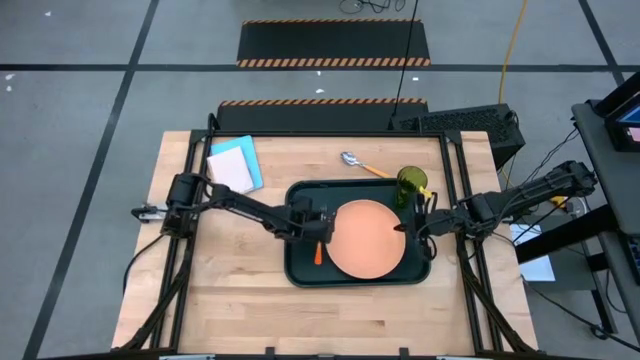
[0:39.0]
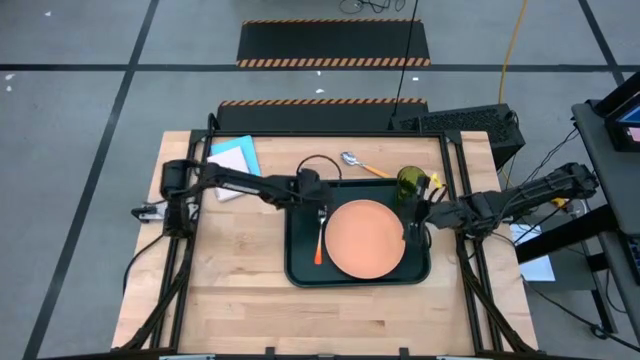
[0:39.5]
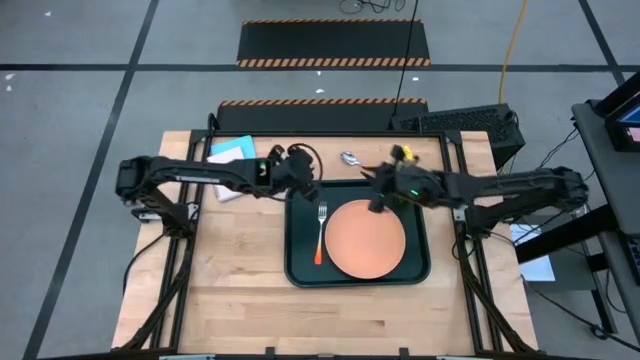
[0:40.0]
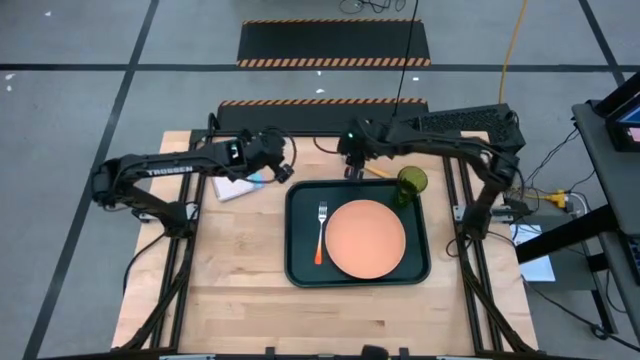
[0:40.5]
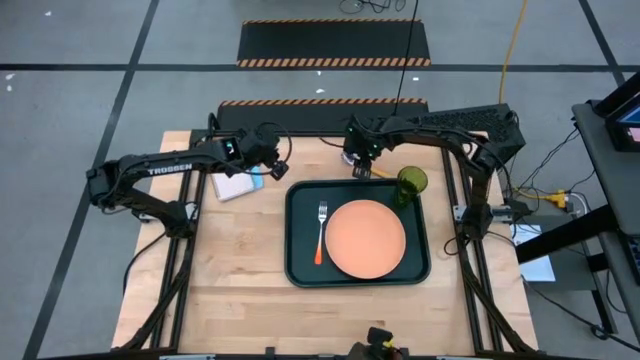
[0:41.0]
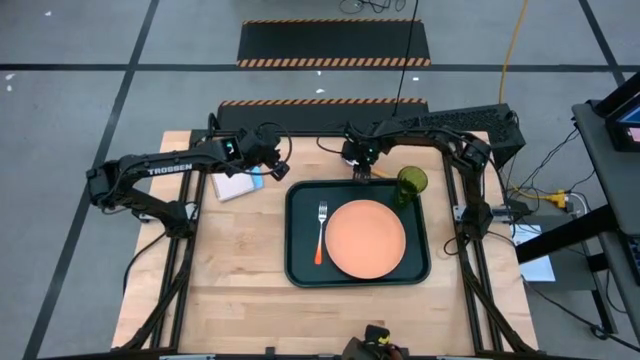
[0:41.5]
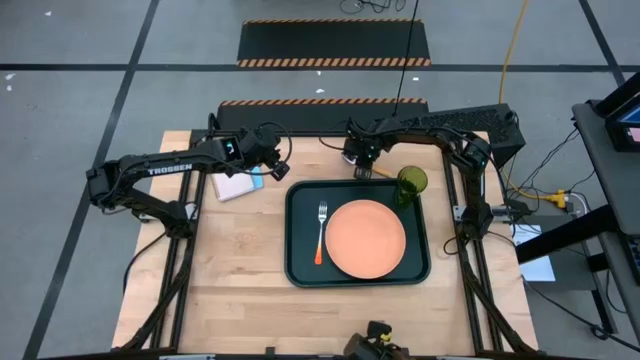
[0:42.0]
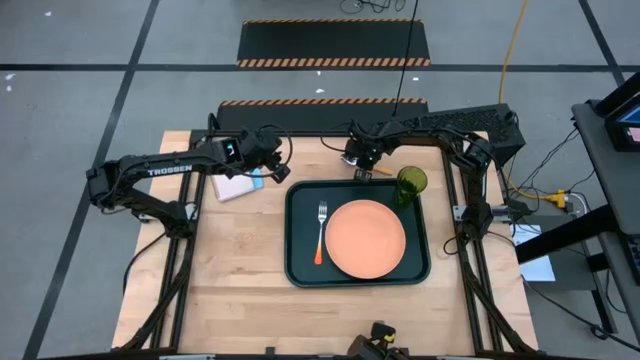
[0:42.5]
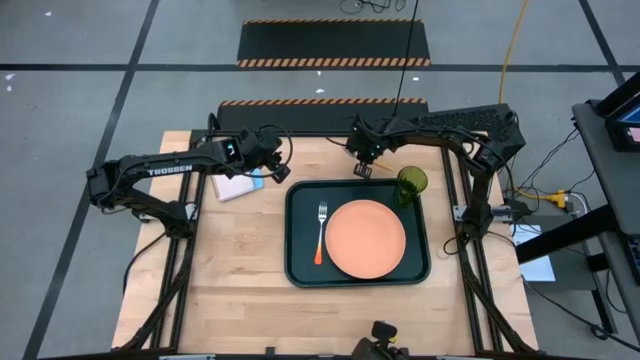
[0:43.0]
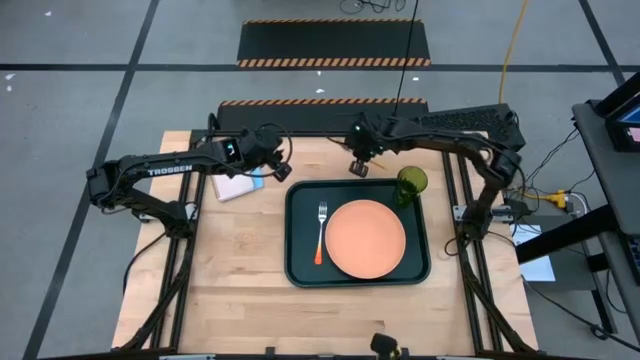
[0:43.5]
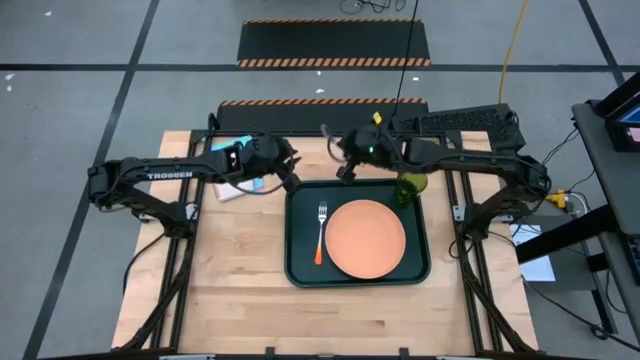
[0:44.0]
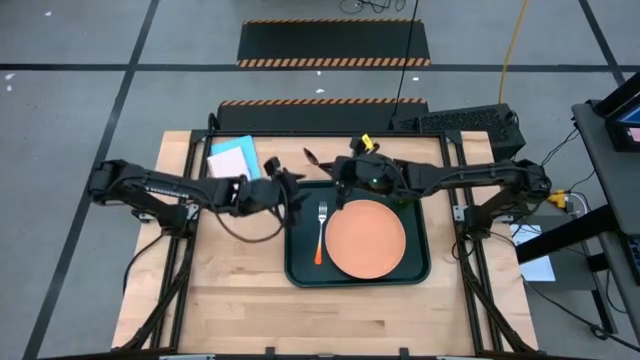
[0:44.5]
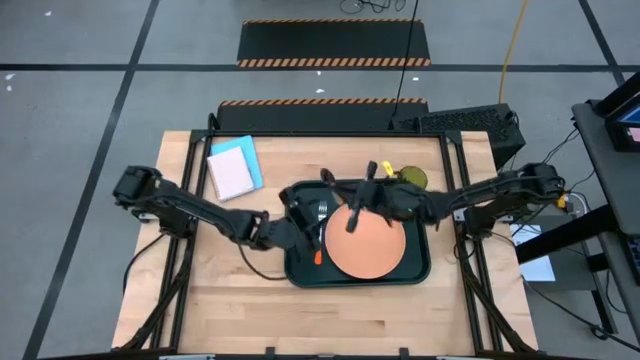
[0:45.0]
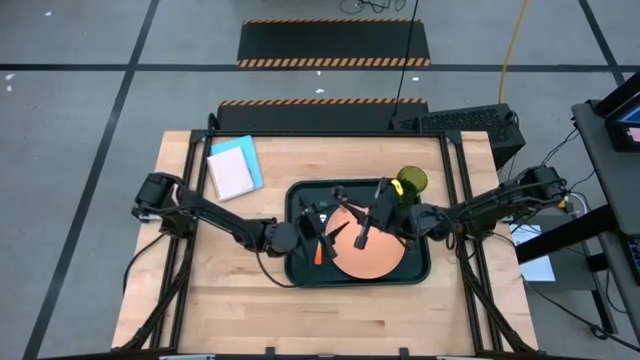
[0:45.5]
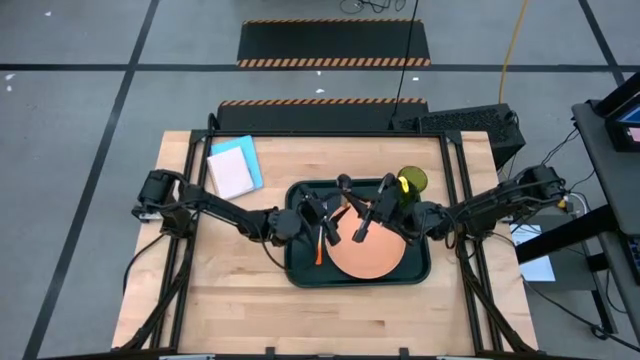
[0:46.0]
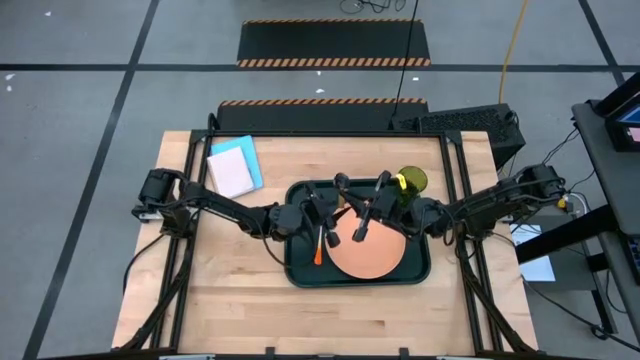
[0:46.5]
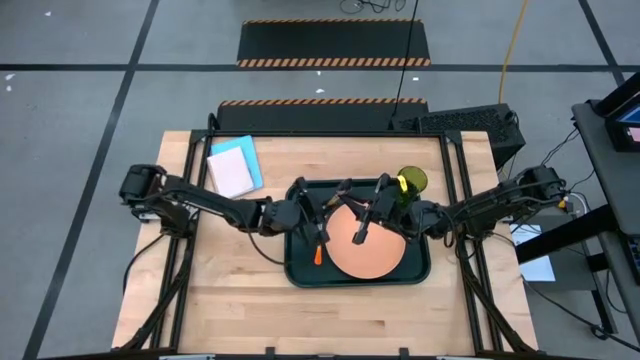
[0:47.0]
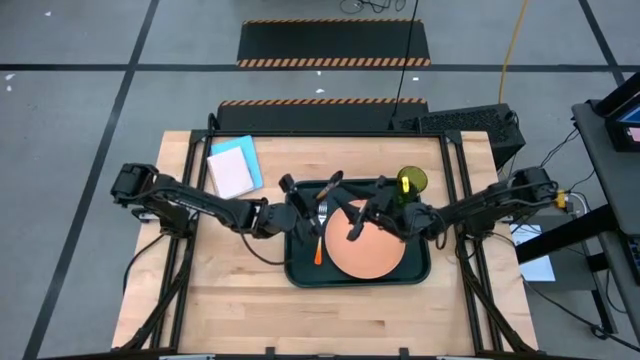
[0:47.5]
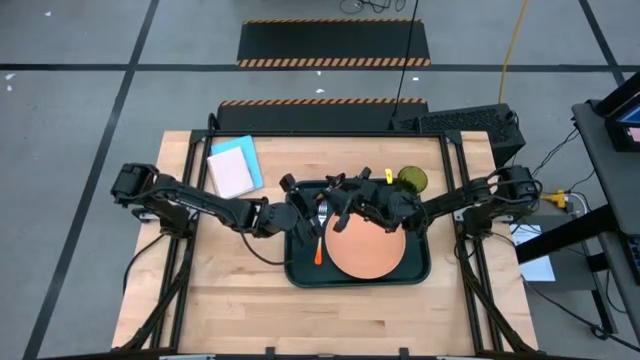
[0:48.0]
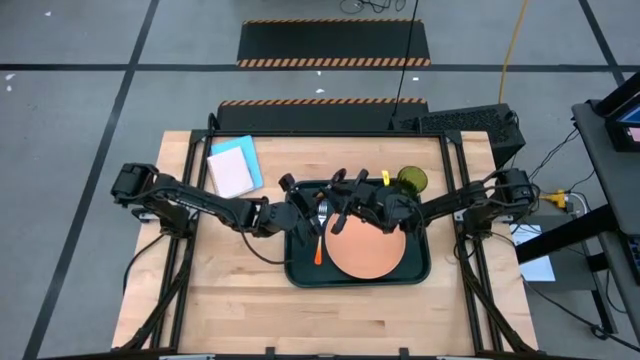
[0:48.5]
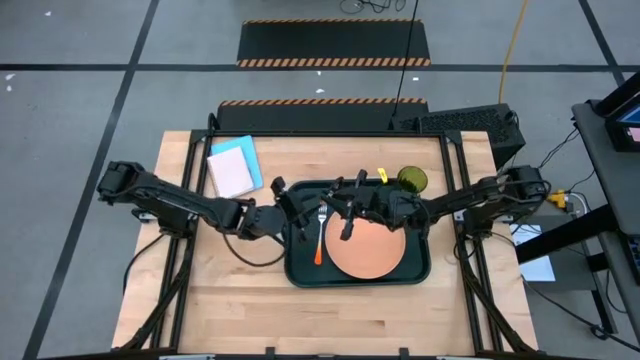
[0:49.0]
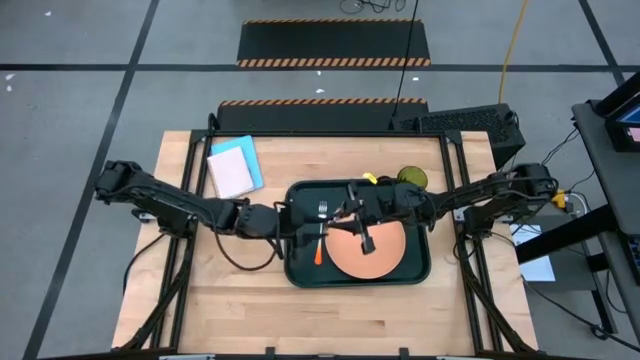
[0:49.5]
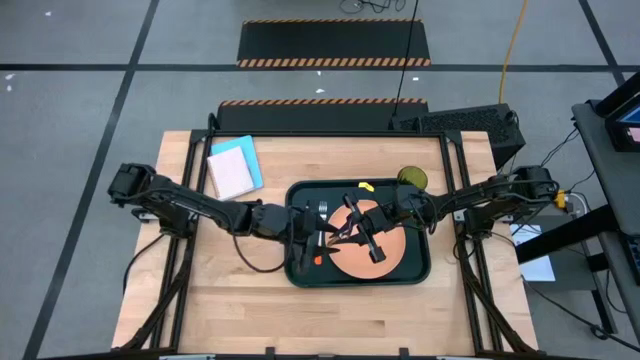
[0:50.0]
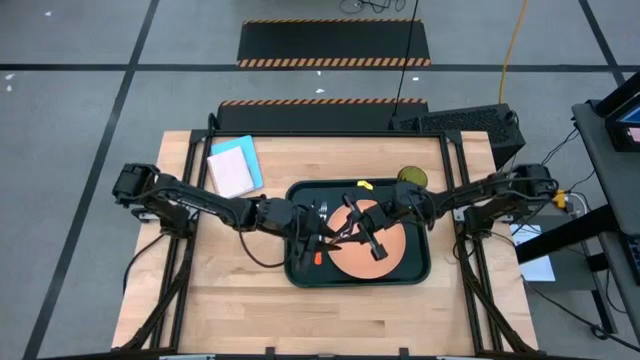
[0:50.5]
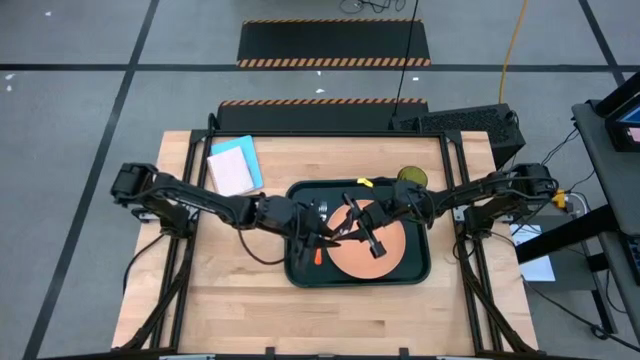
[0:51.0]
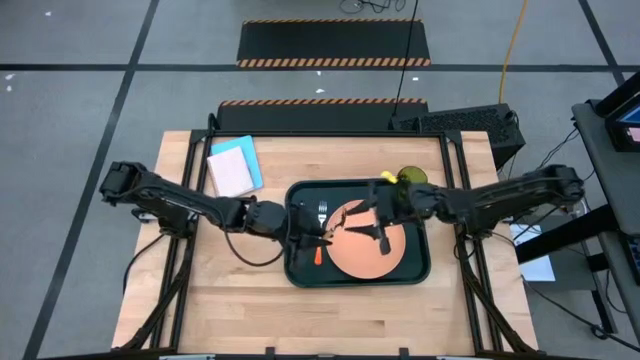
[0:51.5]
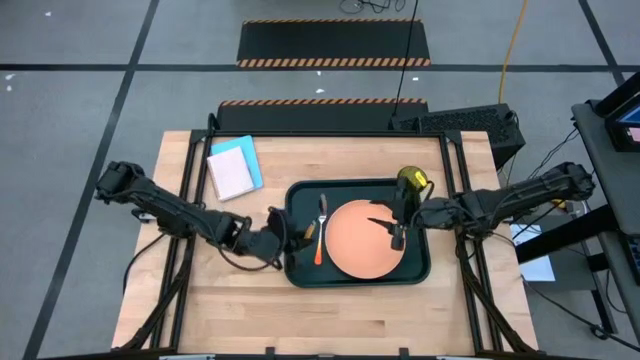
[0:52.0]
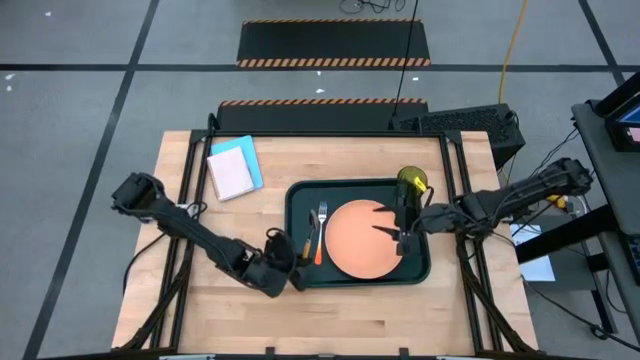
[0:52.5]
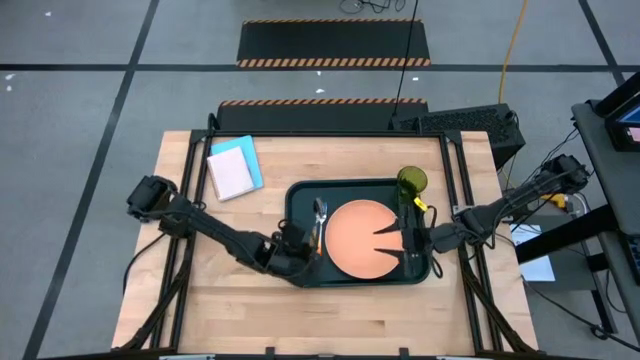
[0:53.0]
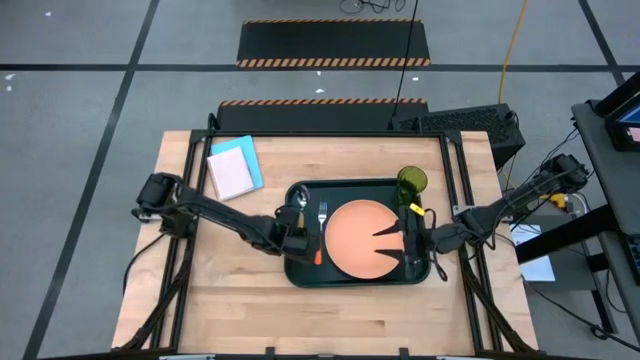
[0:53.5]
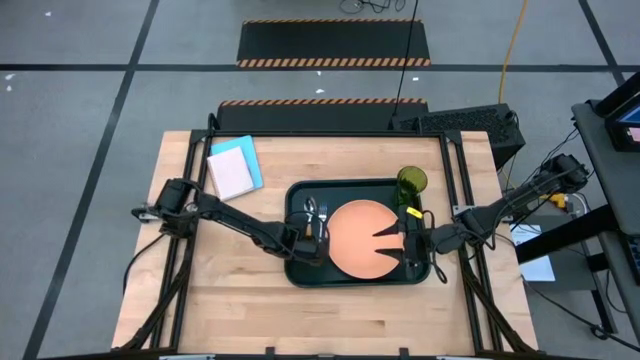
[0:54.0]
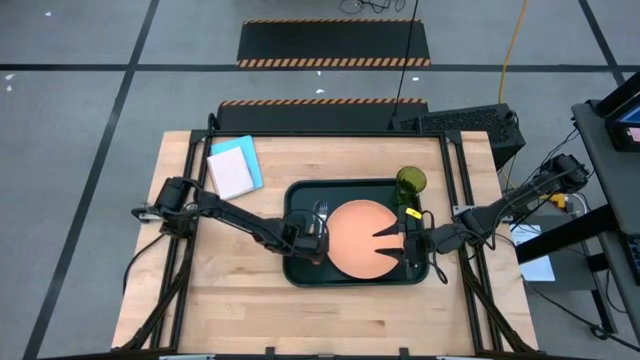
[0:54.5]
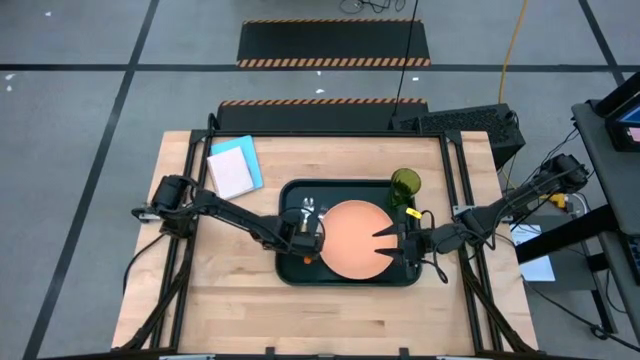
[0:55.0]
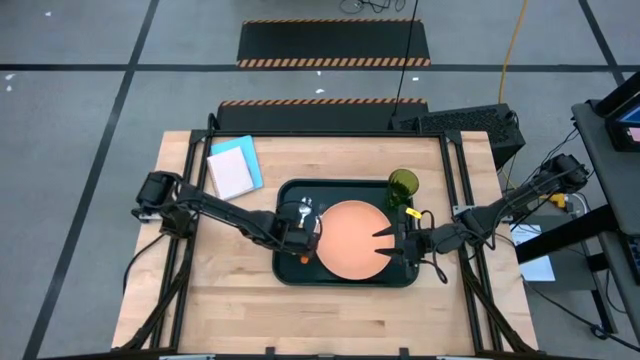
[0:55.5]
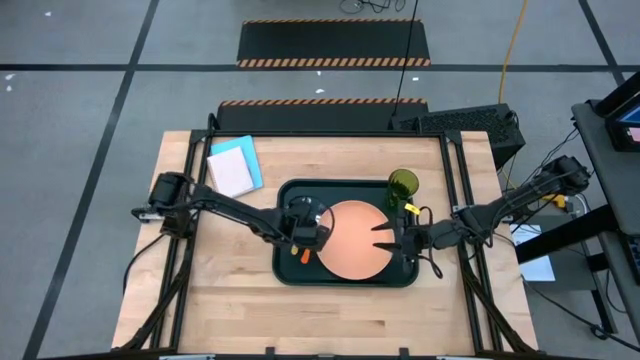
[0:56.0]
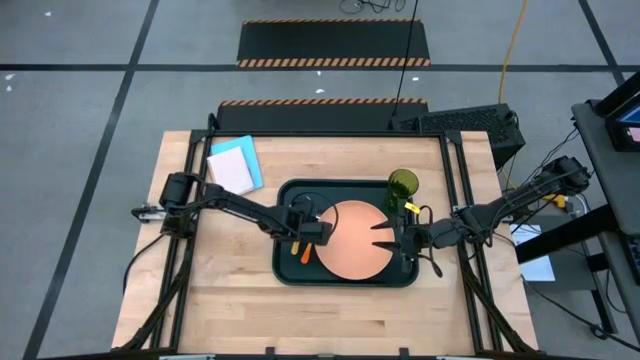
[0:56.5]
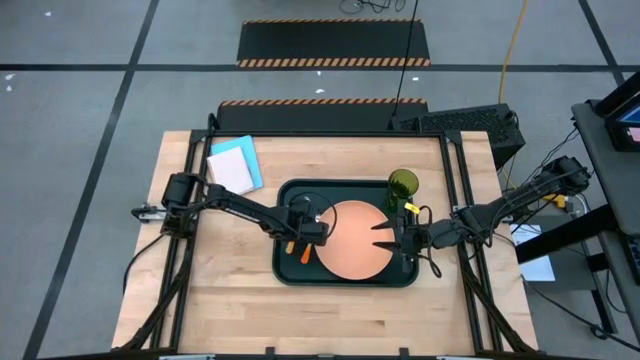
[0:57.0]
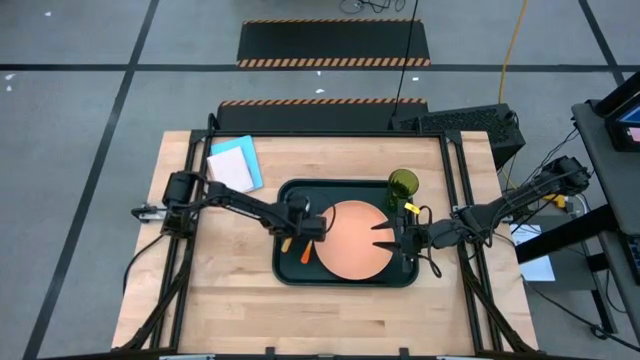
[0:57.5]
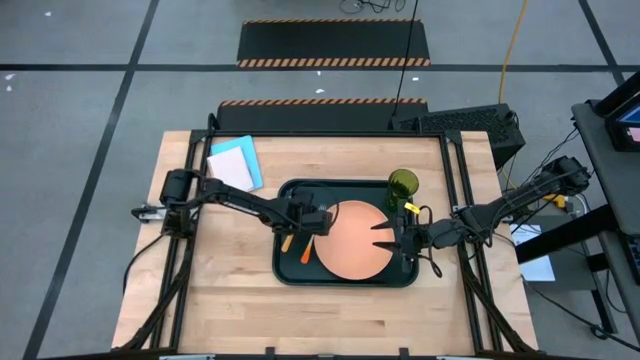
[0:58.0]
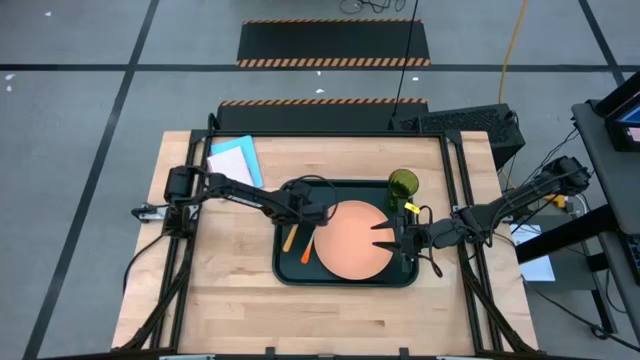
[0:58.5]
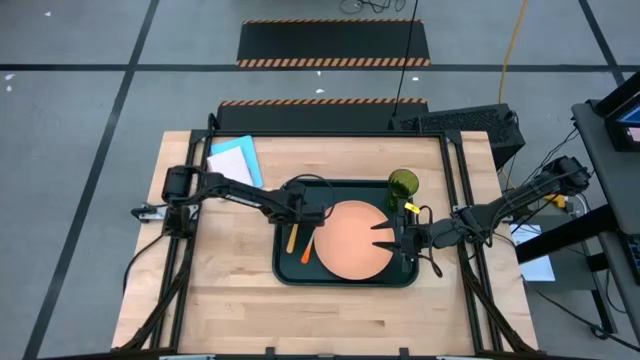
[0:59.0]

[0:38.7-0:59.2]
Task: Pick and place plate/cup/fork/spoon on tray
Put the orange spoon on the green tray to the left of the orange fork

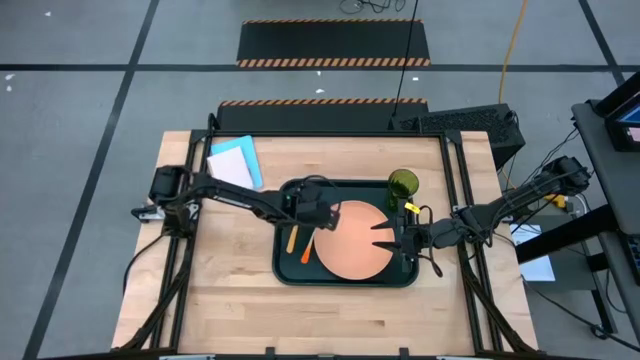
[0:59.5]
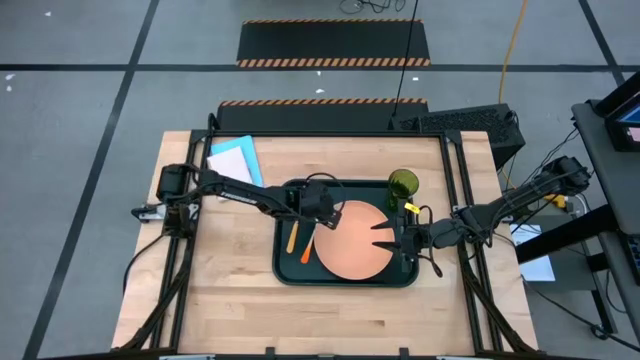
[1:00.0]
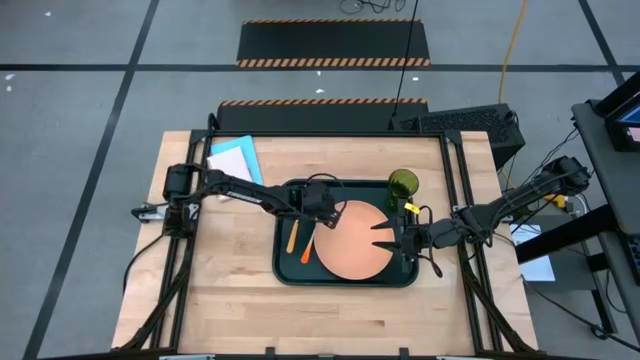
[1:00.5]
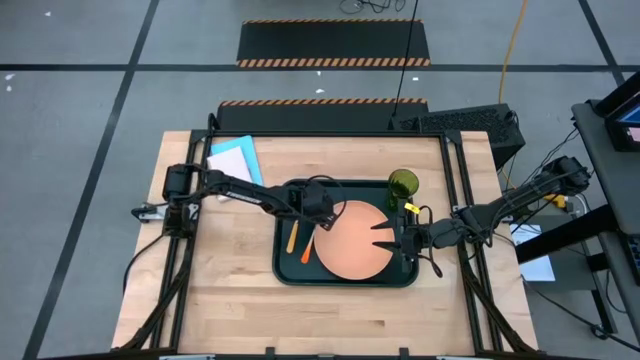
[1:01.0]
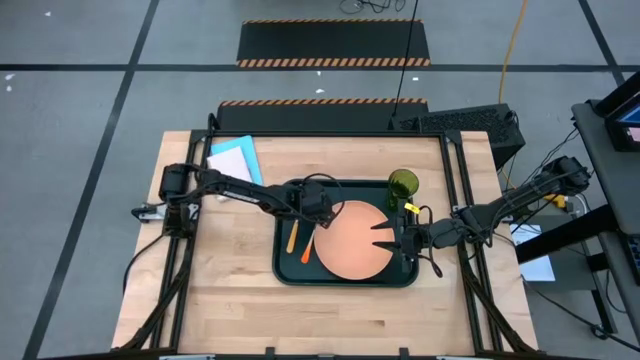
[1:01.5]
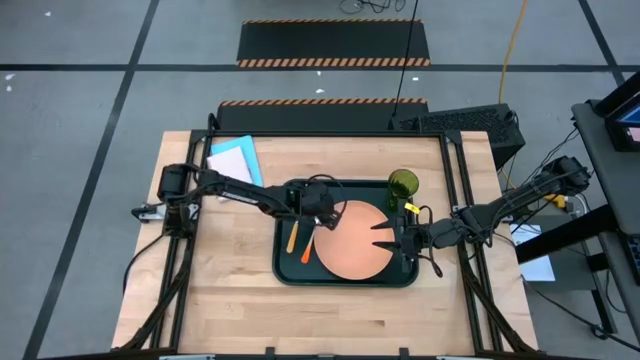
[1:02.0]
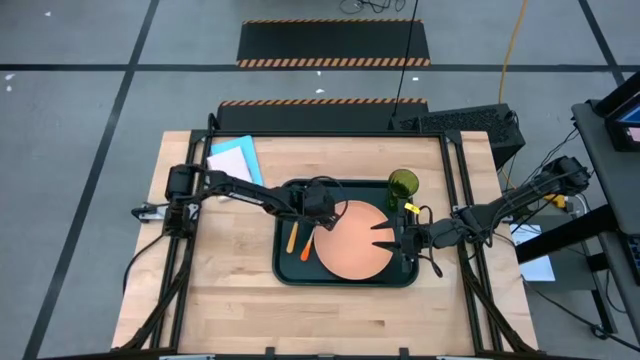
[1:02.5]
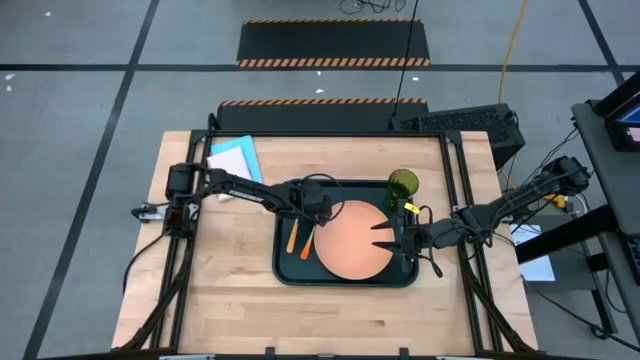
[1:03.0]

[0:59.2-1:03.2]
Adjust the orange fork
